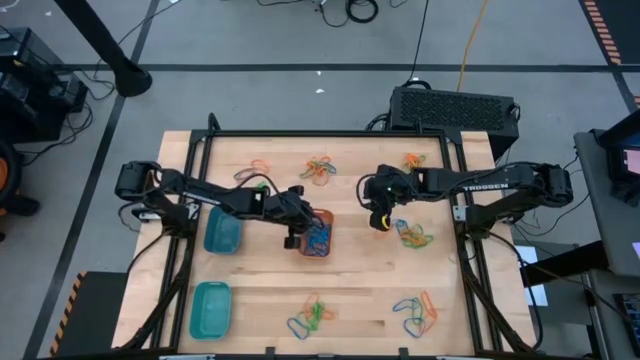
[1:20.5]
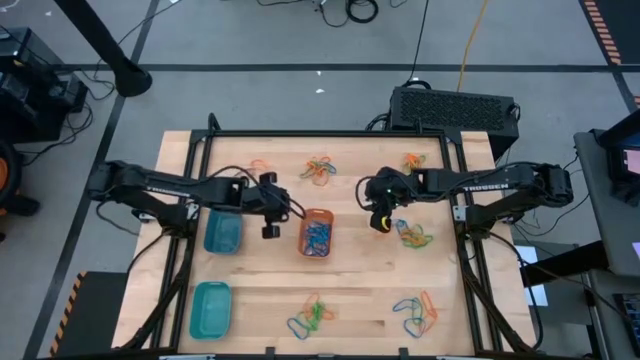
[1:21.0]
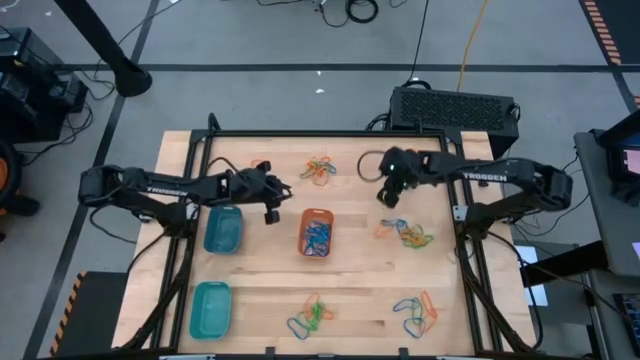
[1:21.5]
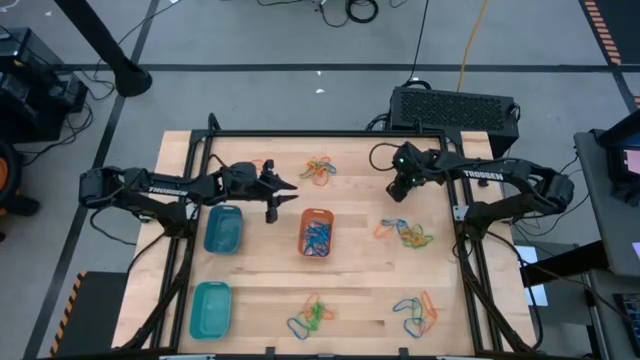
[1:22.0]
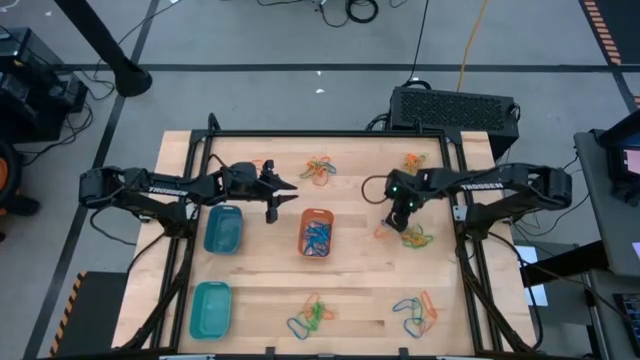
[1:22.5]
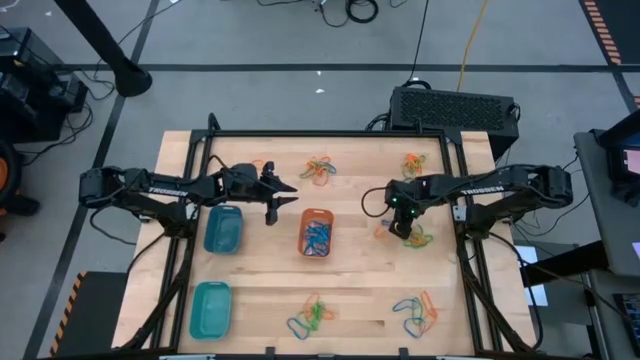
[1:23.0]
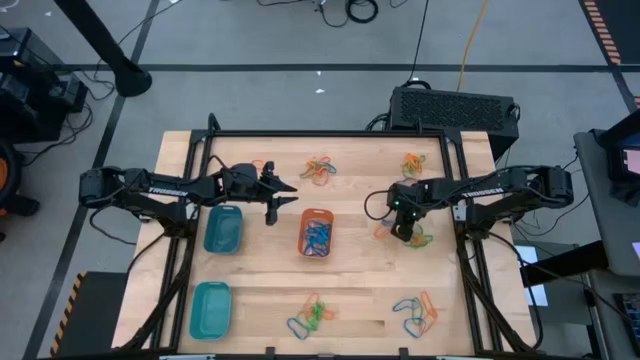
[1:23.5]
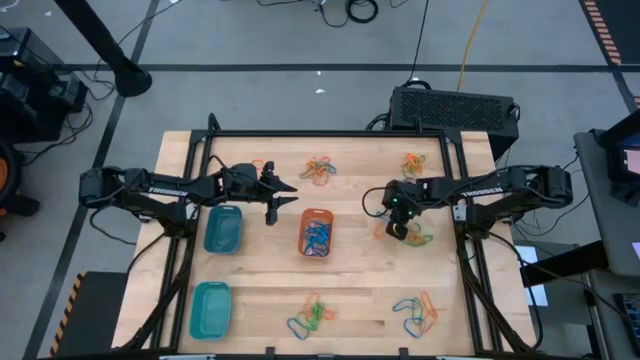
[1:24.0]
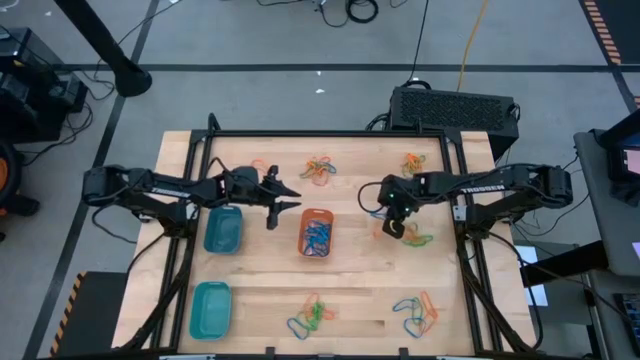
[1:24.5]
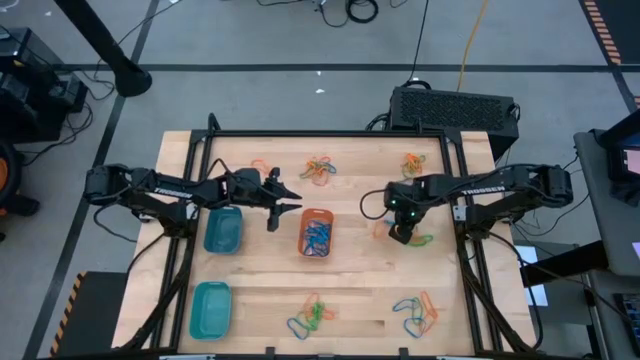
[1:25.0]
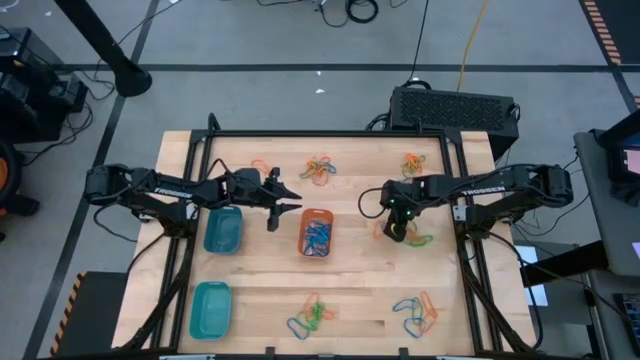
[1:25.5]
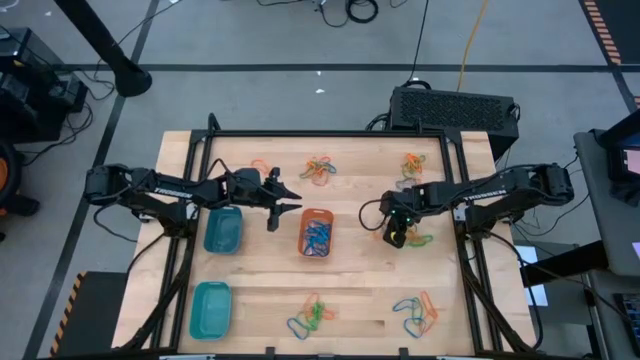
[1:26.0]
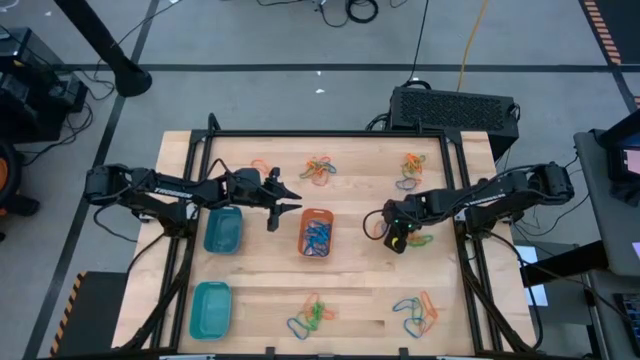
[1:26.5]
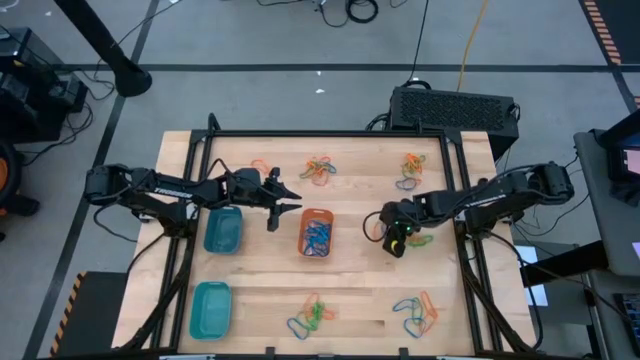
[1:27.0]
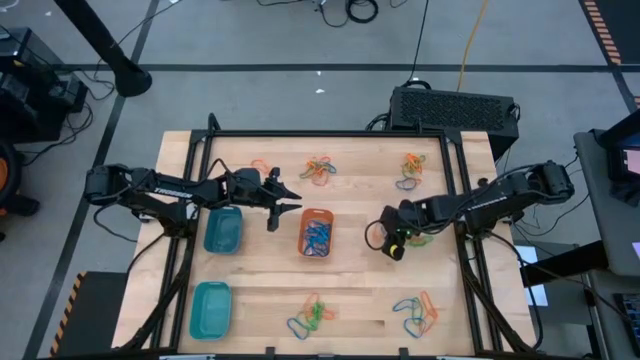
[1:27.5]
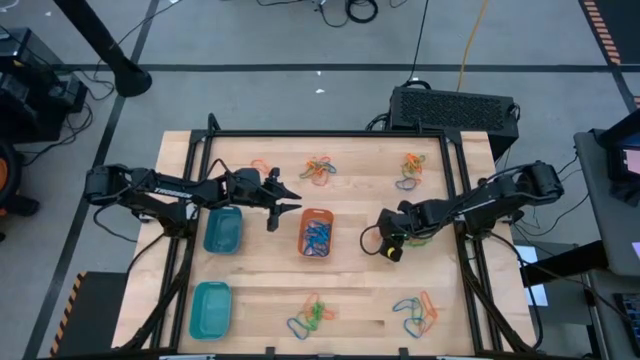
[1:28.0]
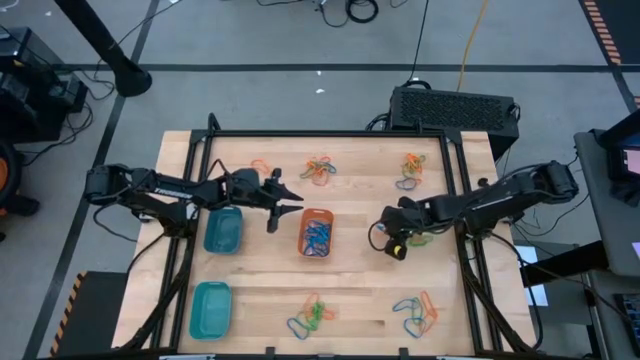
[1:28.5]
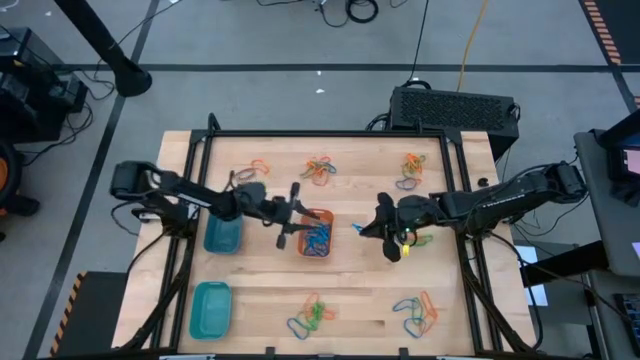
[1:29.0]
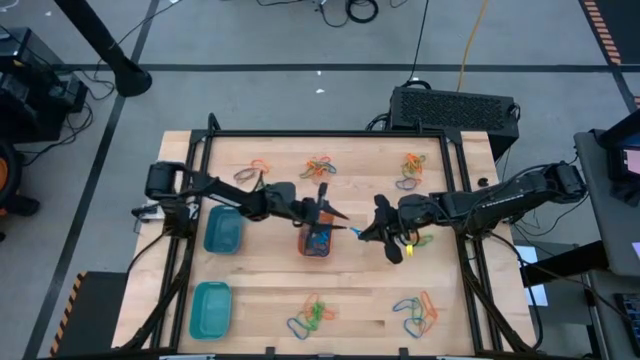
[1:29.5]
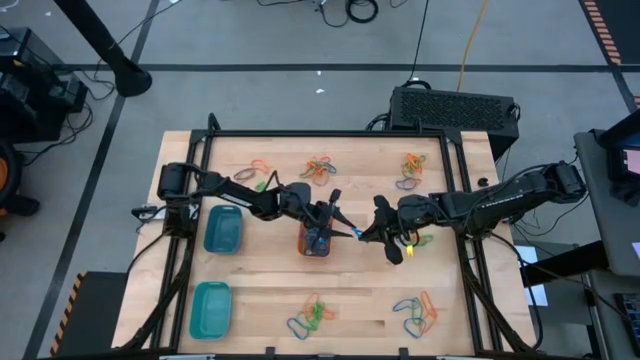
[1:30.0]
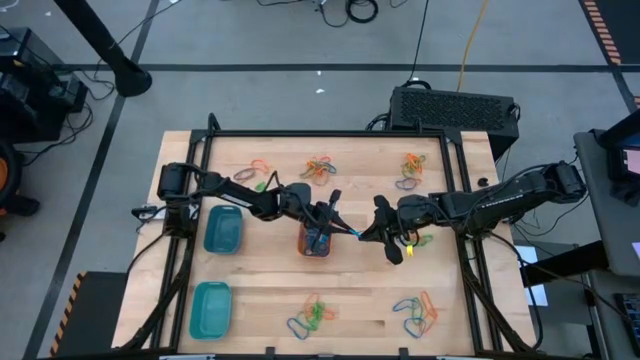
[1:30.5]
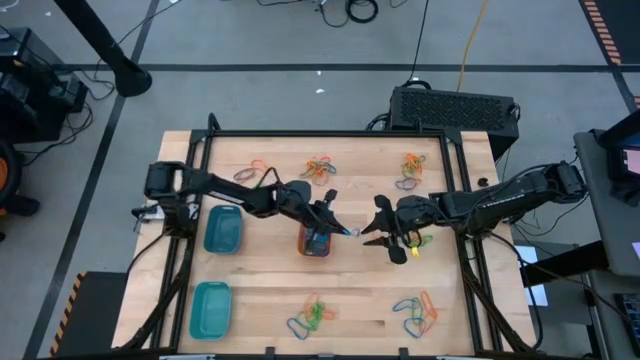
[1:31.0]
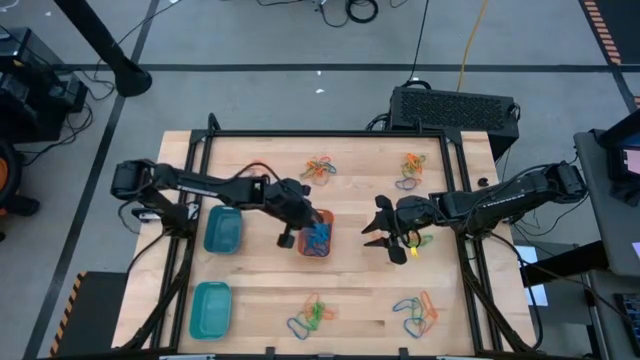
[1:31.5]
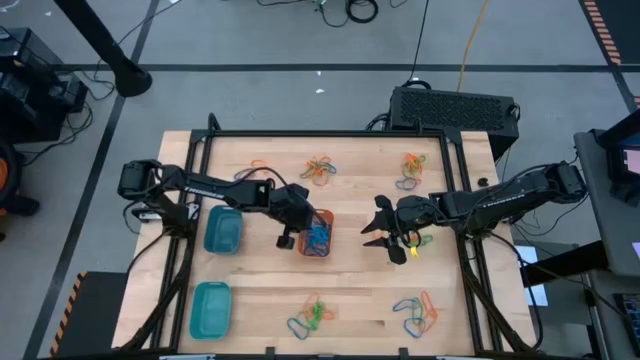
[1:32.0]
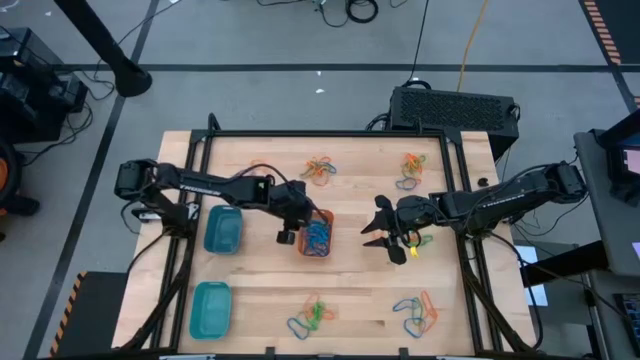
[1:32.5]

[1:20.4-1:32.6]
Task: Sort rubber bands into baskets
Put the blue rubber band into the orange bin

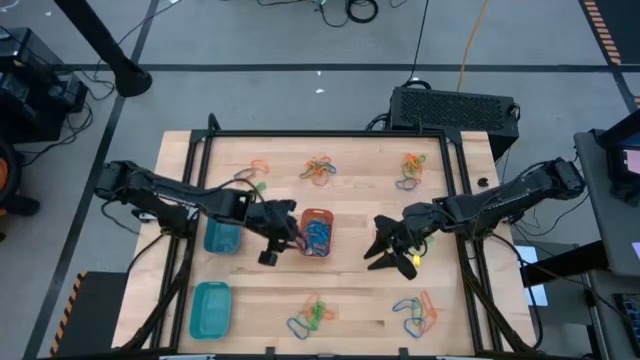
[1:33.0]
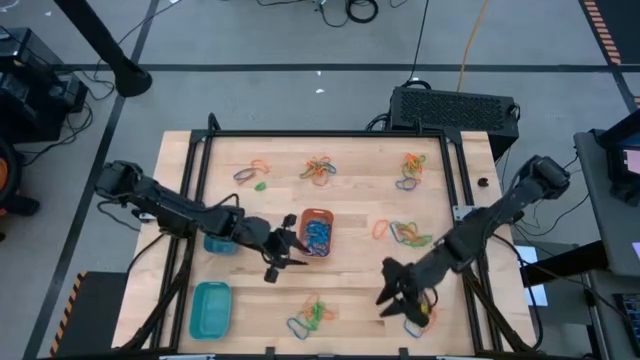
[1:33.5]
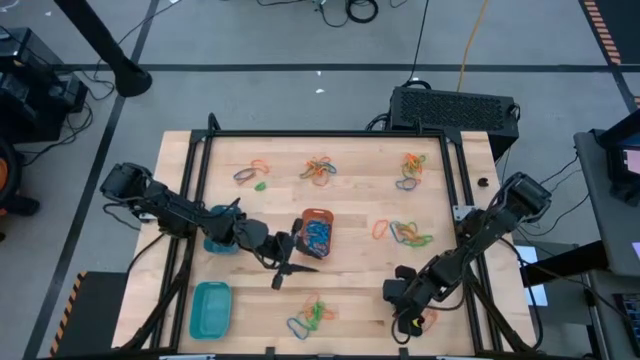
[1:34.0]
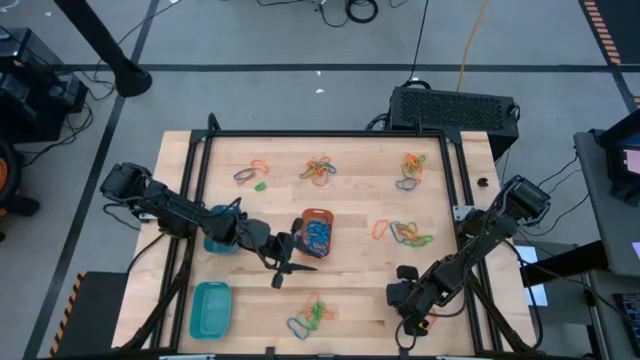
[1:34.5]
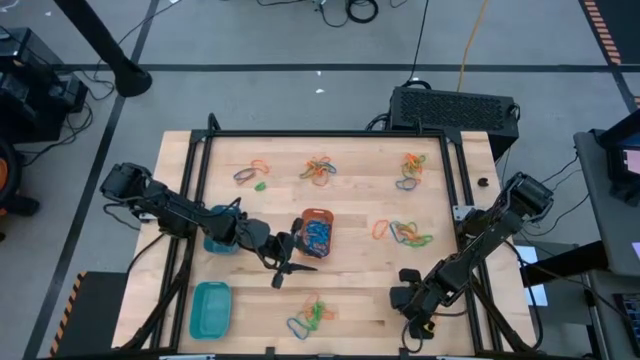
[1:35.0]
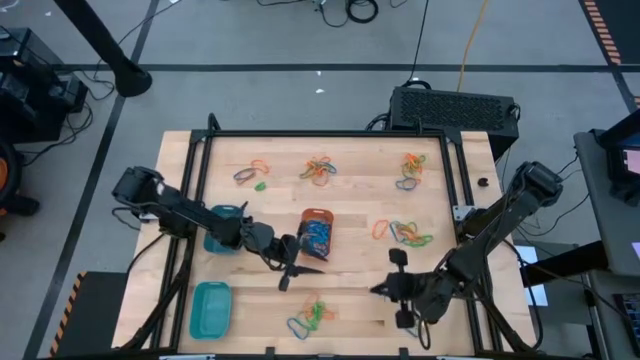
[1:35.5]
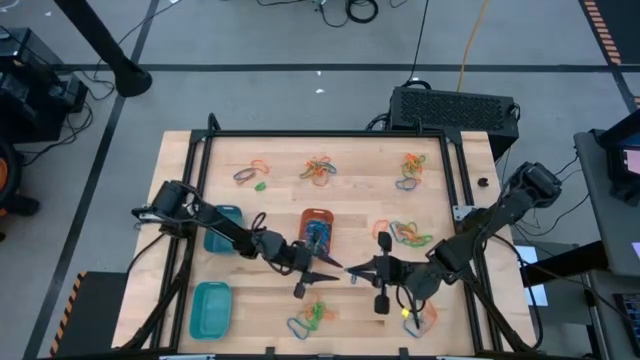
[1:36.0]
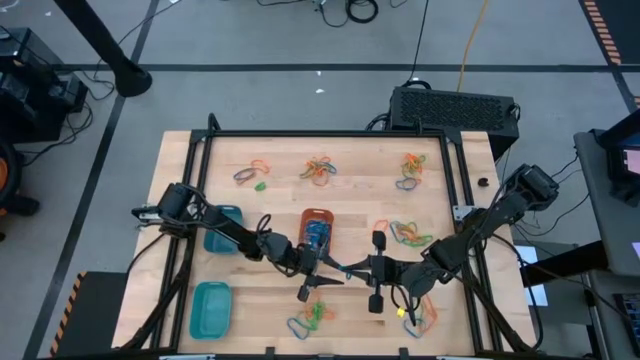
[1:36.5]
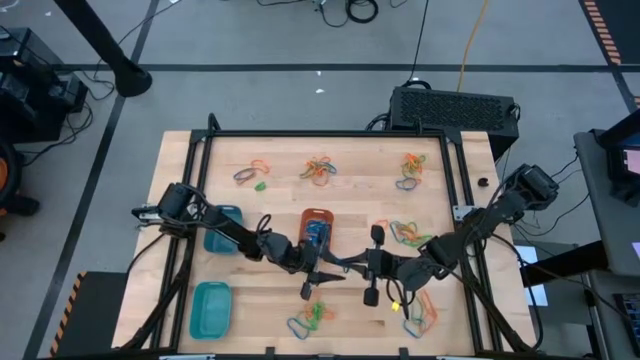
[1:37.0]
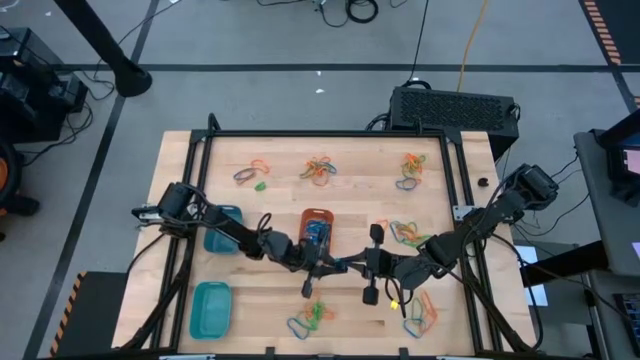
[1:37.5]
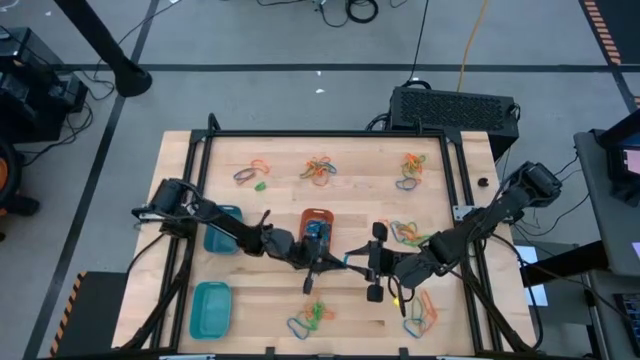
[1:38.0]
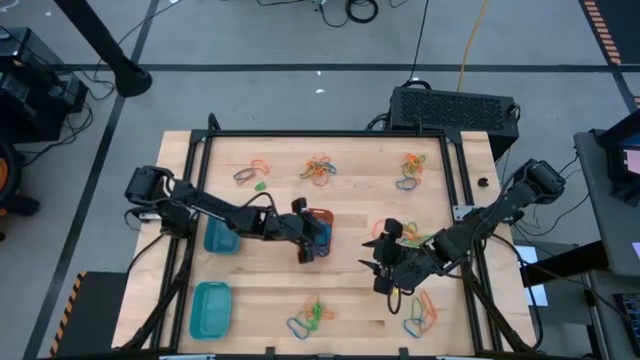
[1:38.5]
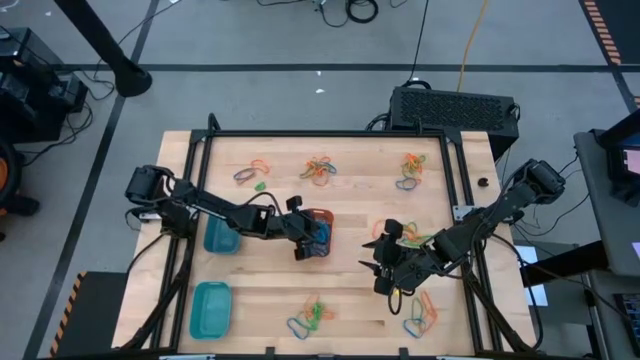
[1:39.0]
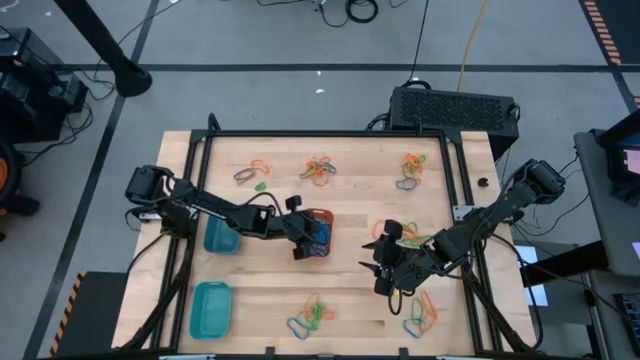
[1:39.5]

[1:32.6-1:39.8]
Put the blue rubber band into the orange bin

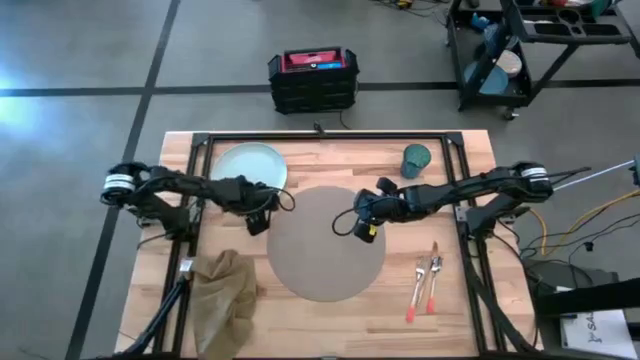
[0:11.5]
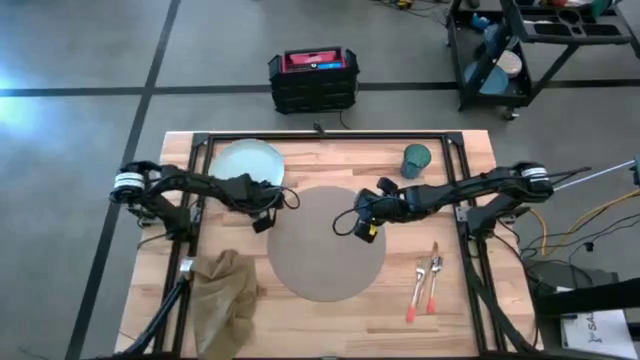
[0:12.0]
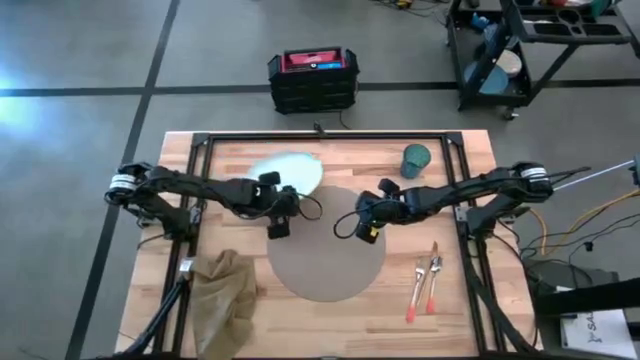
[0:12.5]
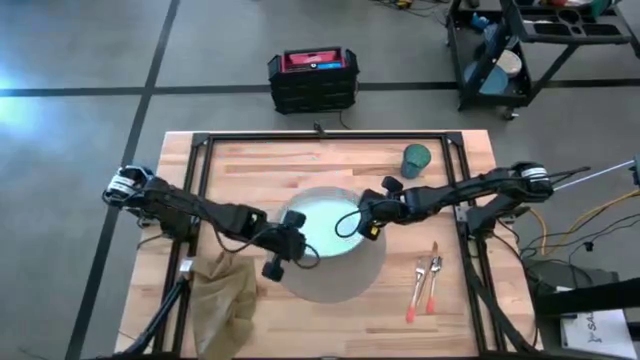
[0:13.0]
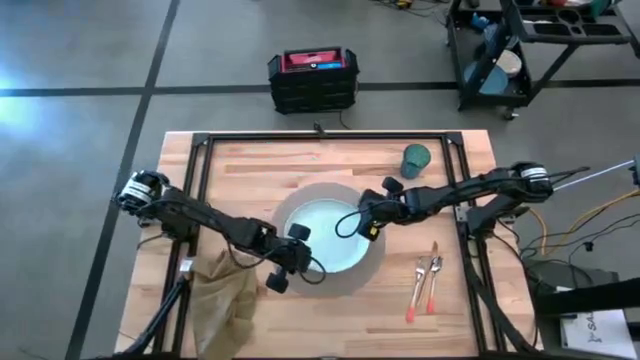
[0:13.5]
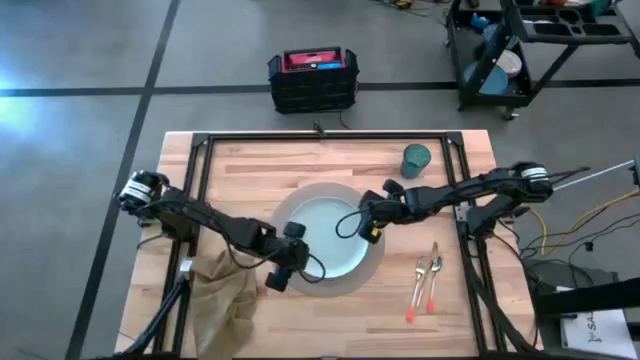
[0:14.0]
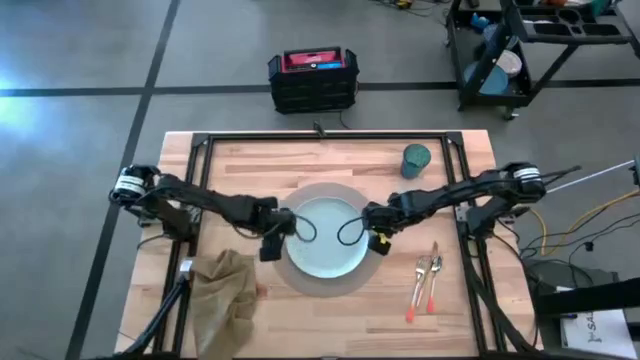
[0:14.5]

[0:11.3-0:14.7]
Task: Set table place
Put the white plate on the grey tablemat

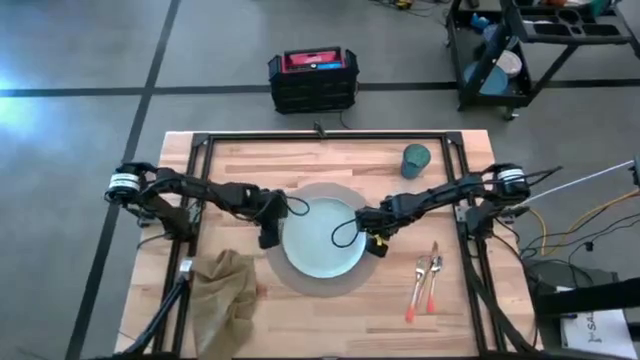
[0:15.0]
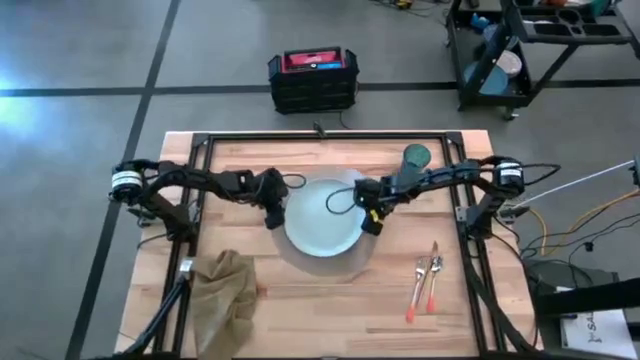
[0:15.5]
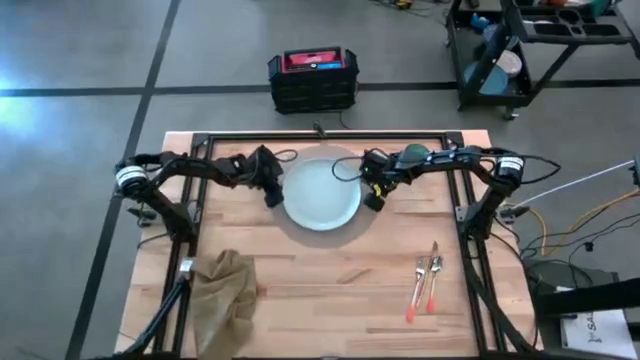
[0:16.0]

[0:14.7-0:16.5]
Move the grey tablemat to the top middle of the table
